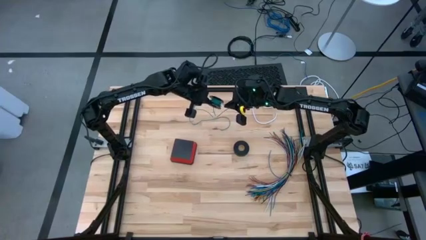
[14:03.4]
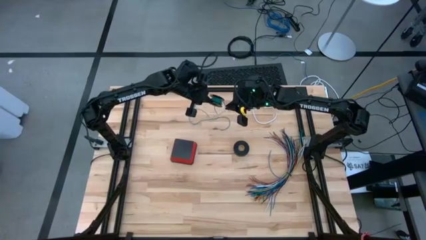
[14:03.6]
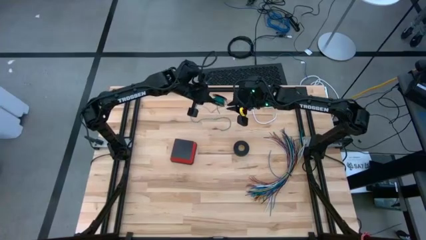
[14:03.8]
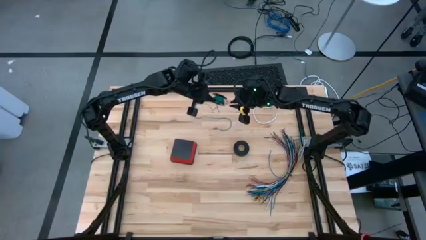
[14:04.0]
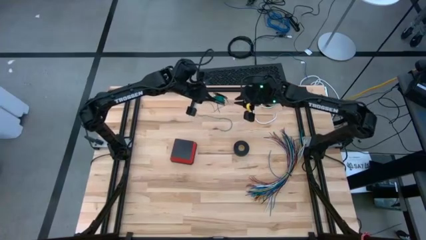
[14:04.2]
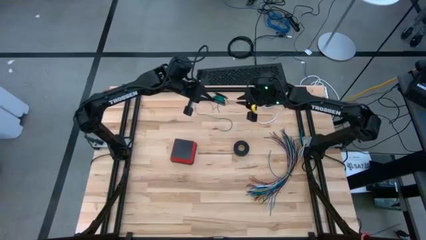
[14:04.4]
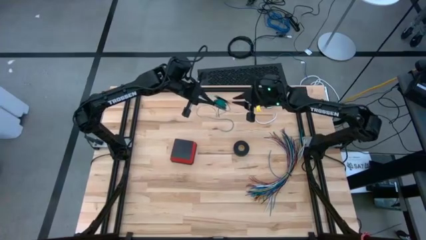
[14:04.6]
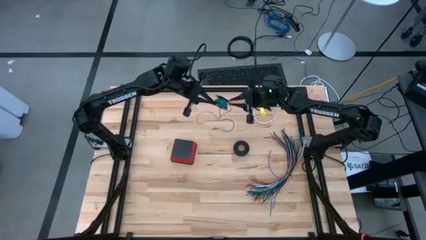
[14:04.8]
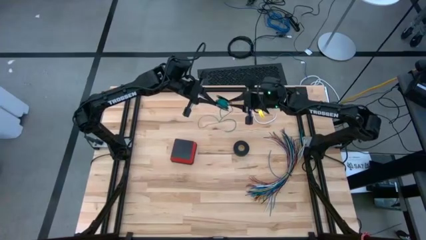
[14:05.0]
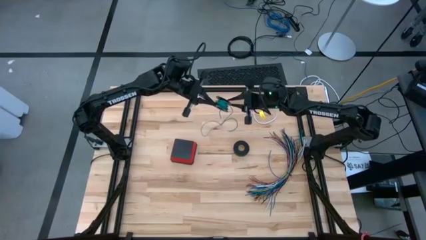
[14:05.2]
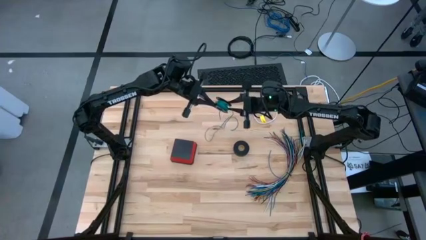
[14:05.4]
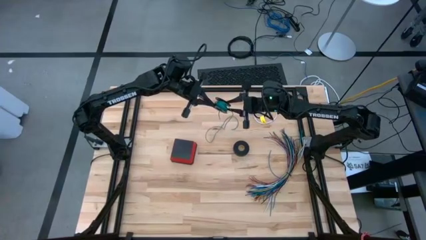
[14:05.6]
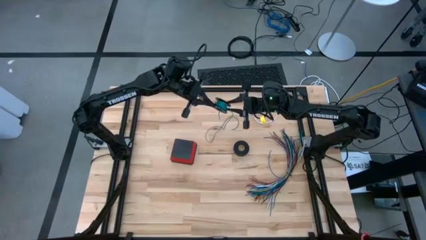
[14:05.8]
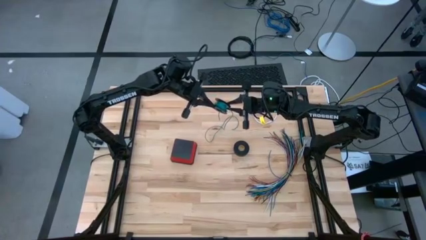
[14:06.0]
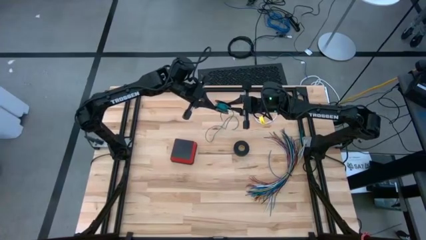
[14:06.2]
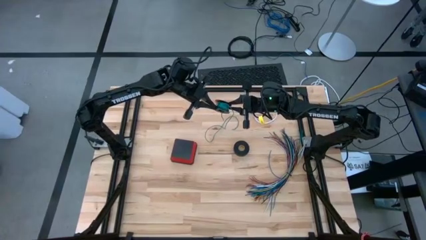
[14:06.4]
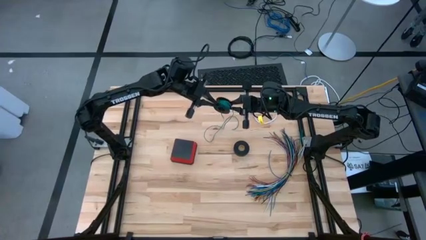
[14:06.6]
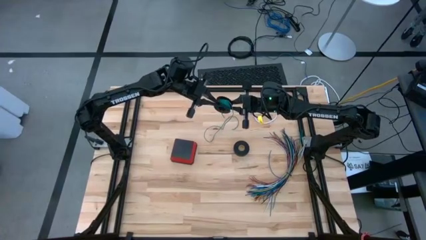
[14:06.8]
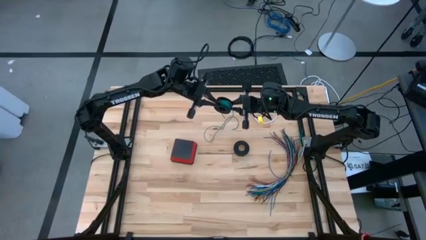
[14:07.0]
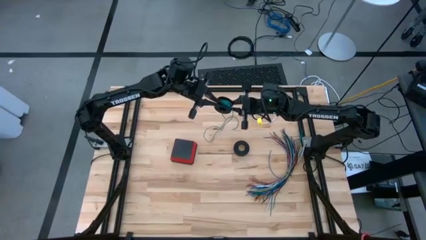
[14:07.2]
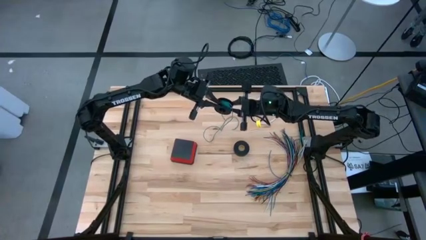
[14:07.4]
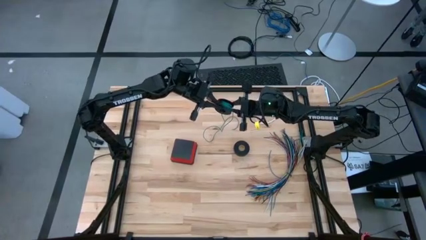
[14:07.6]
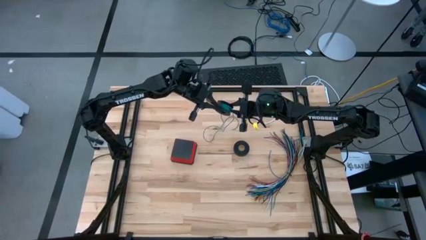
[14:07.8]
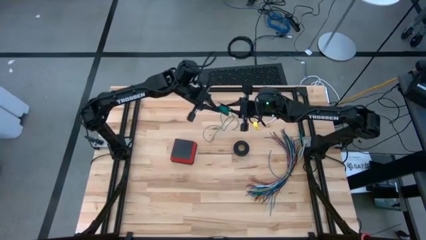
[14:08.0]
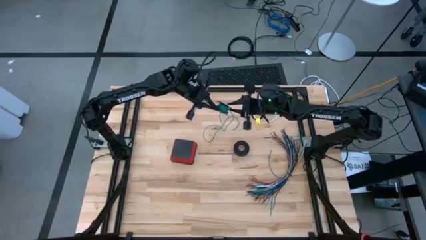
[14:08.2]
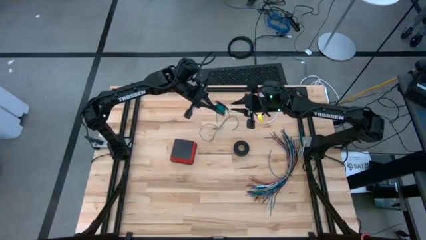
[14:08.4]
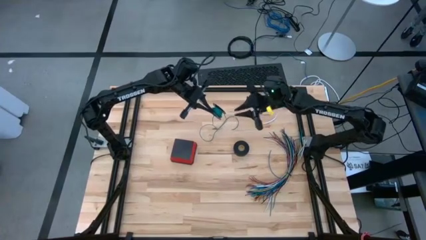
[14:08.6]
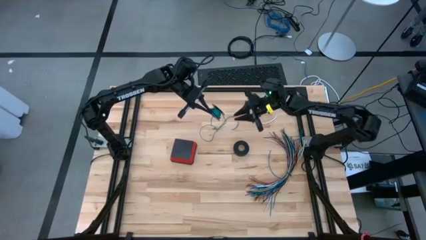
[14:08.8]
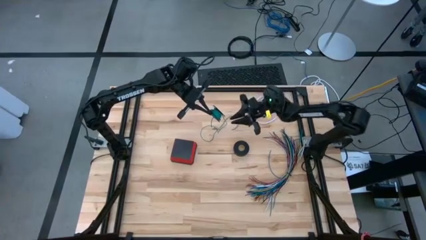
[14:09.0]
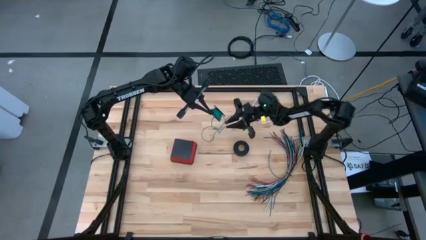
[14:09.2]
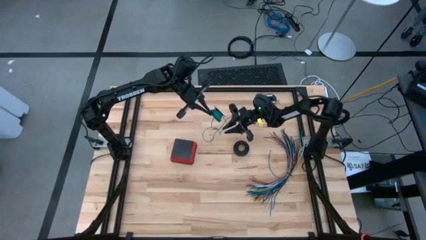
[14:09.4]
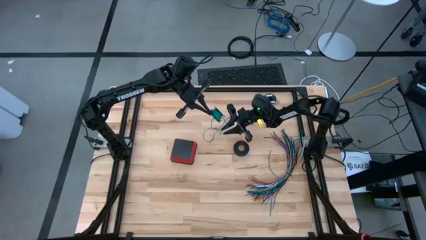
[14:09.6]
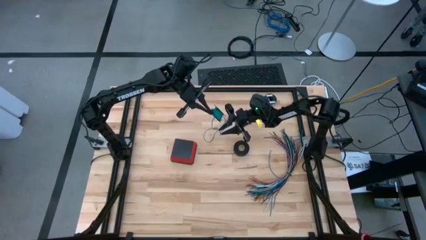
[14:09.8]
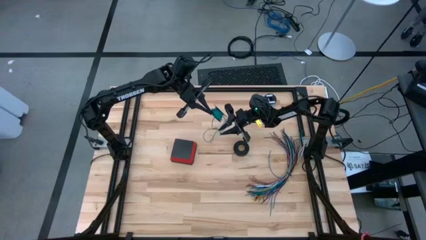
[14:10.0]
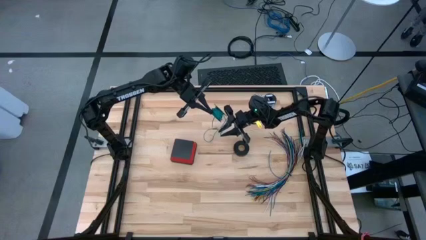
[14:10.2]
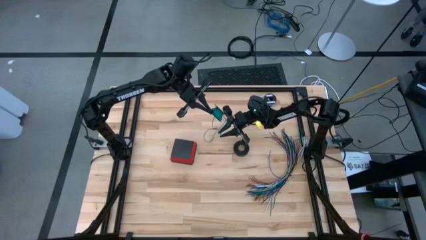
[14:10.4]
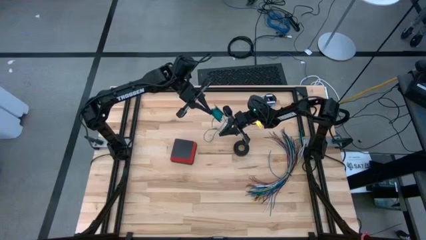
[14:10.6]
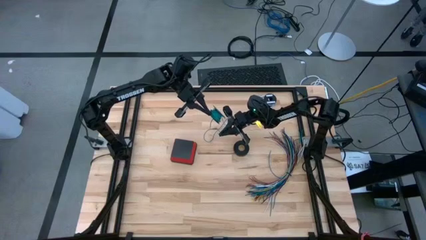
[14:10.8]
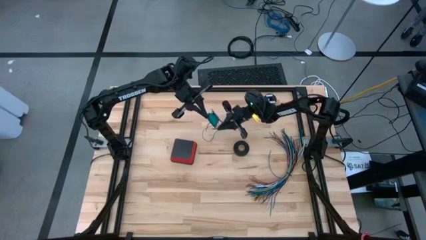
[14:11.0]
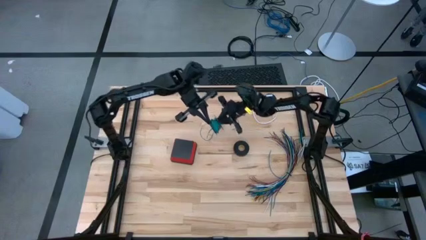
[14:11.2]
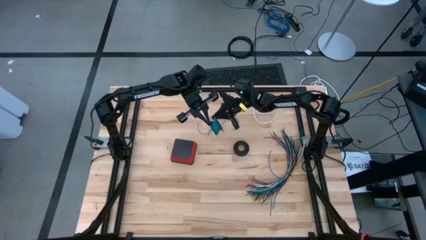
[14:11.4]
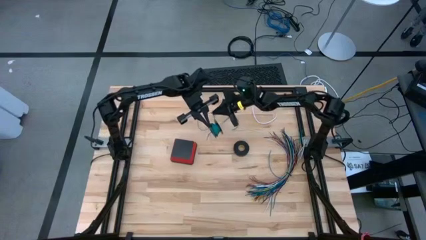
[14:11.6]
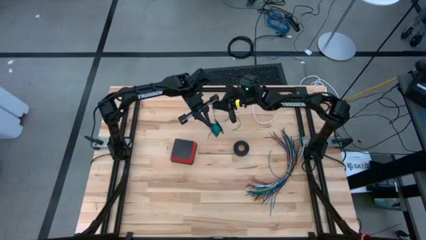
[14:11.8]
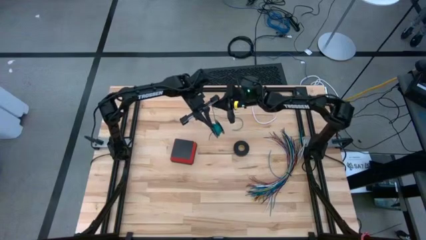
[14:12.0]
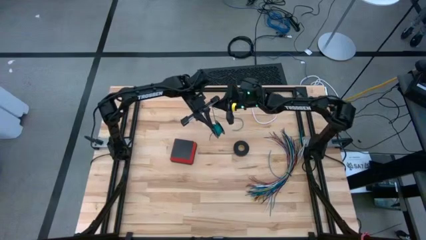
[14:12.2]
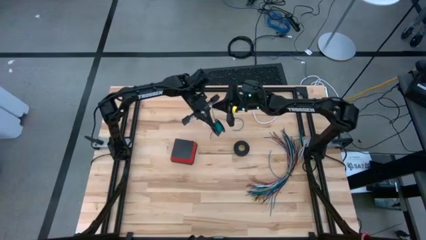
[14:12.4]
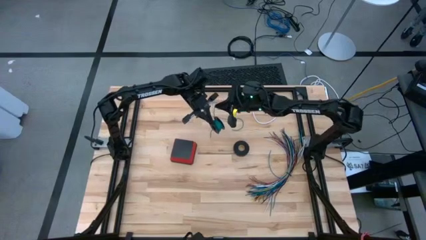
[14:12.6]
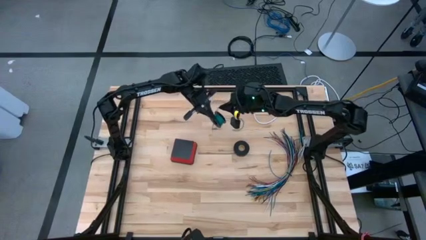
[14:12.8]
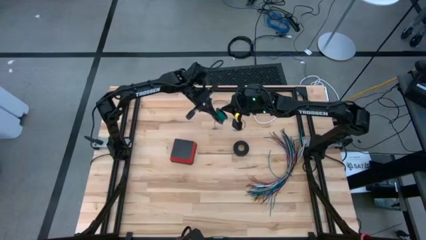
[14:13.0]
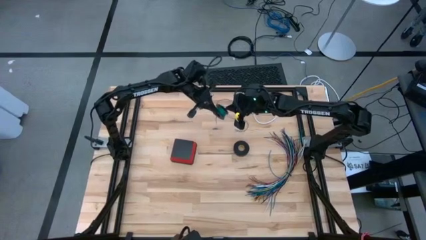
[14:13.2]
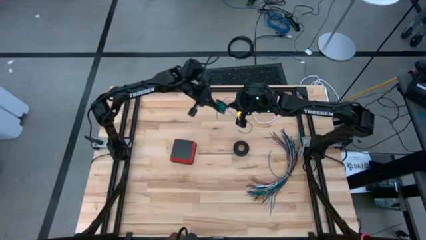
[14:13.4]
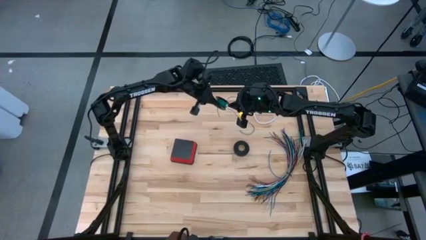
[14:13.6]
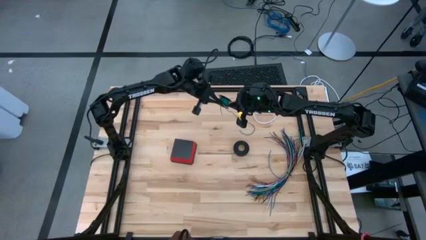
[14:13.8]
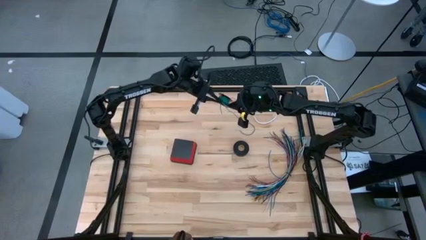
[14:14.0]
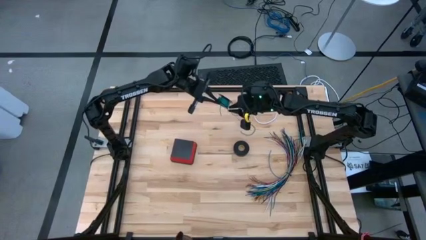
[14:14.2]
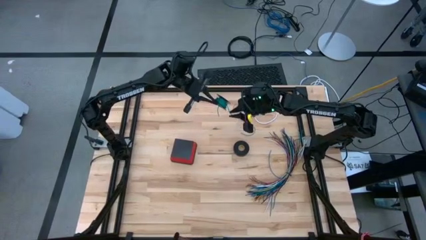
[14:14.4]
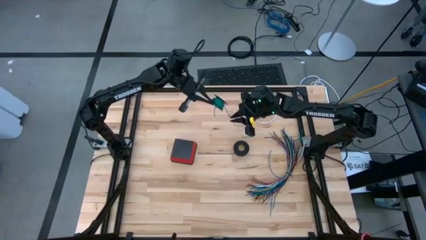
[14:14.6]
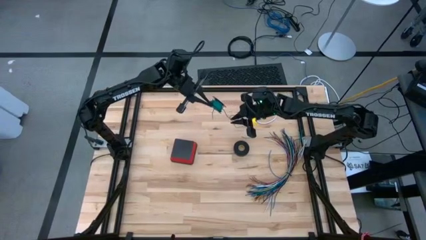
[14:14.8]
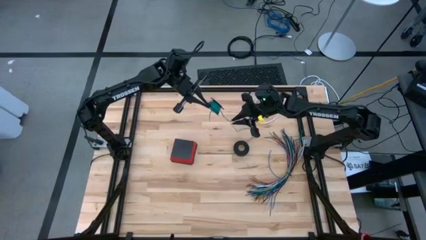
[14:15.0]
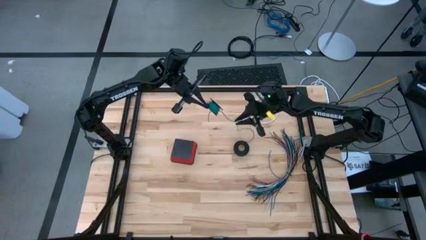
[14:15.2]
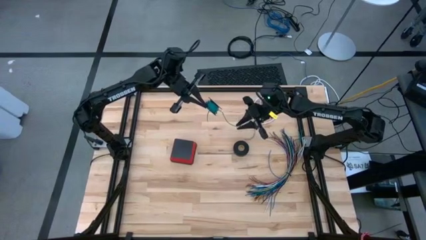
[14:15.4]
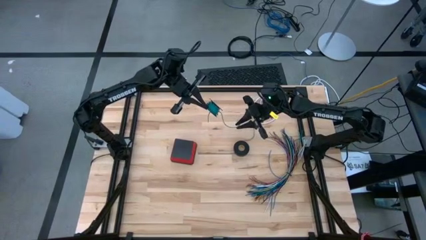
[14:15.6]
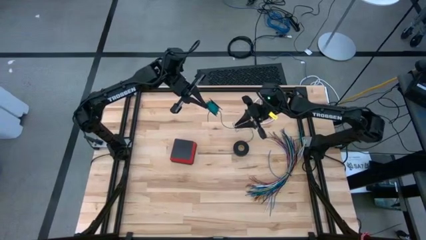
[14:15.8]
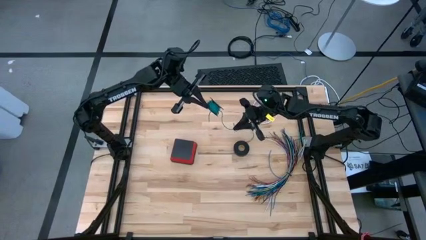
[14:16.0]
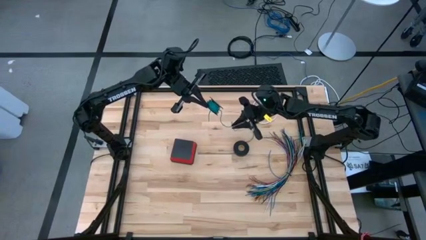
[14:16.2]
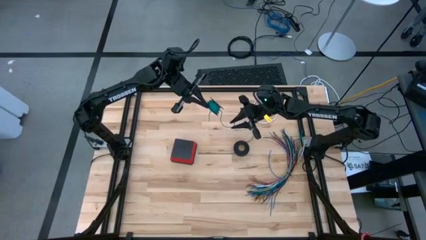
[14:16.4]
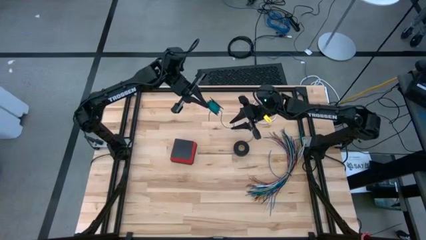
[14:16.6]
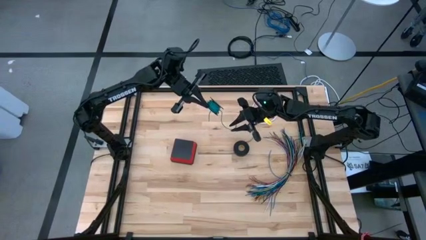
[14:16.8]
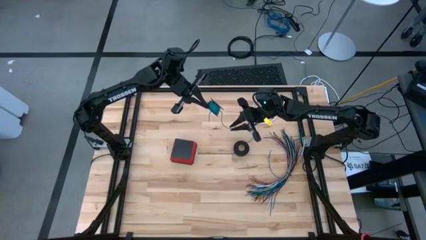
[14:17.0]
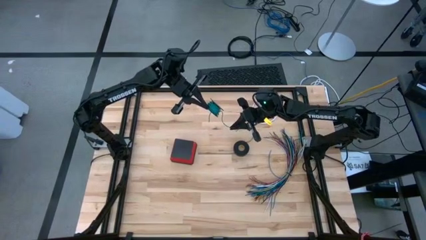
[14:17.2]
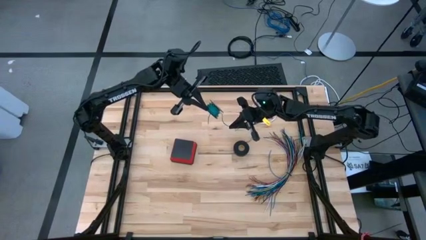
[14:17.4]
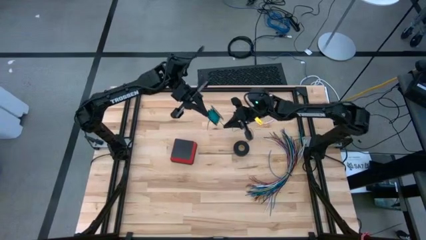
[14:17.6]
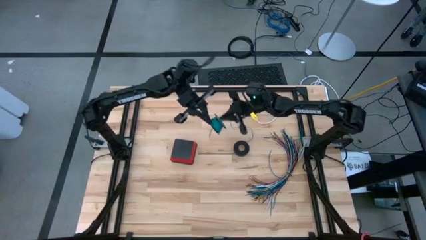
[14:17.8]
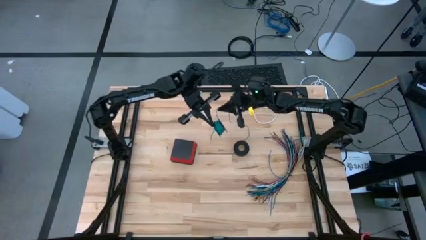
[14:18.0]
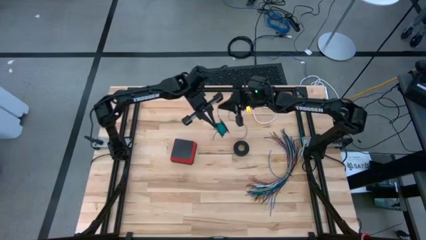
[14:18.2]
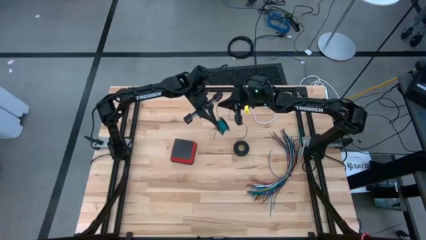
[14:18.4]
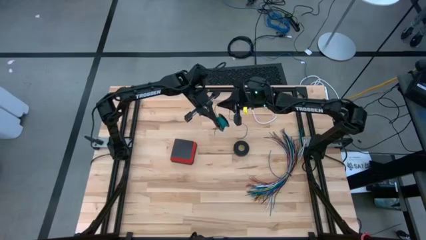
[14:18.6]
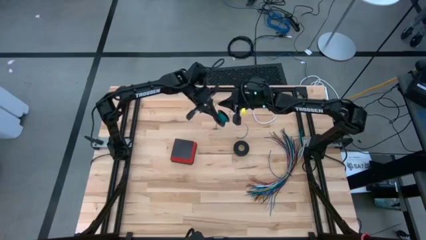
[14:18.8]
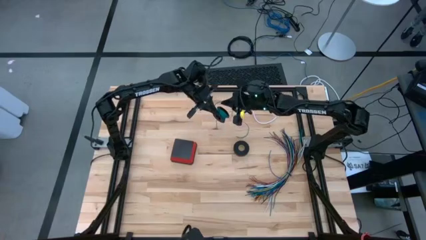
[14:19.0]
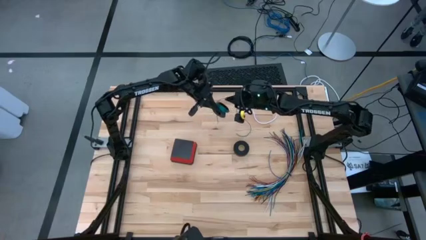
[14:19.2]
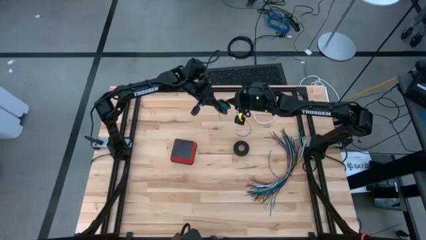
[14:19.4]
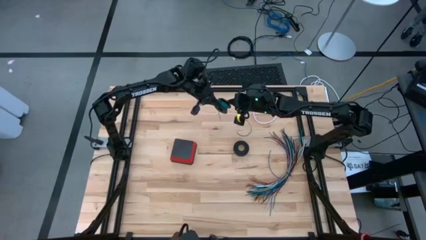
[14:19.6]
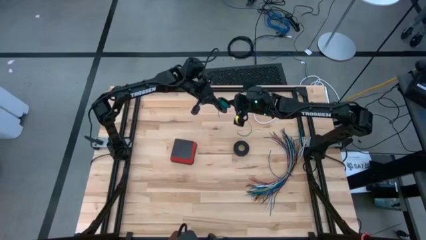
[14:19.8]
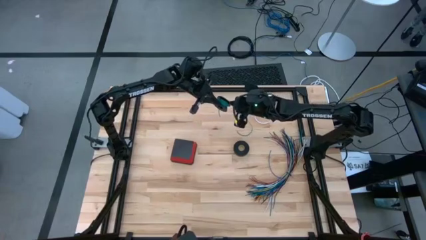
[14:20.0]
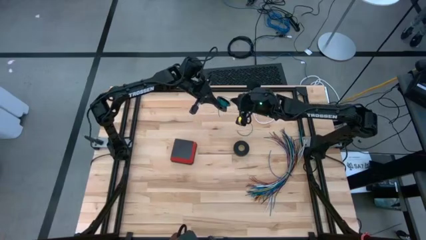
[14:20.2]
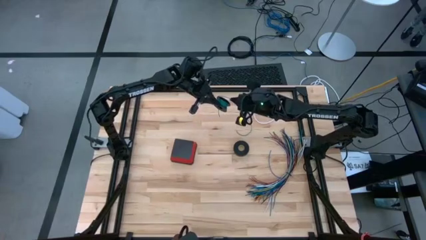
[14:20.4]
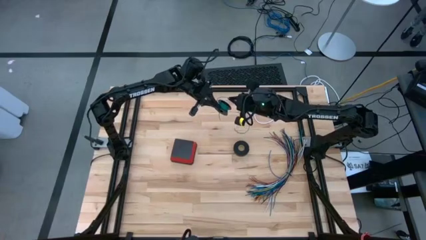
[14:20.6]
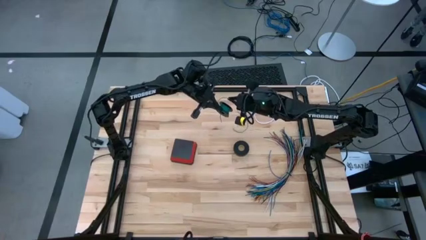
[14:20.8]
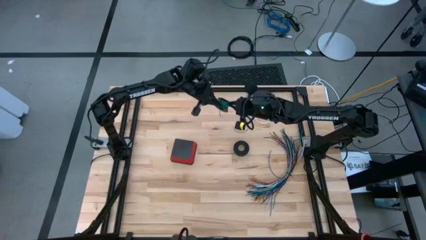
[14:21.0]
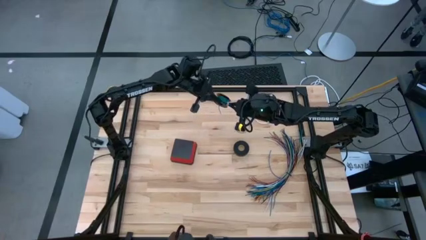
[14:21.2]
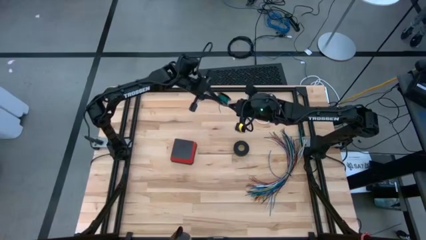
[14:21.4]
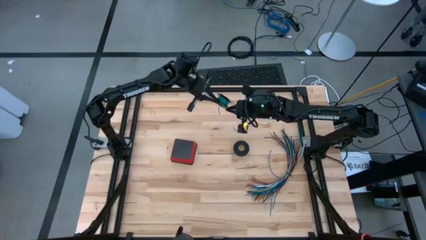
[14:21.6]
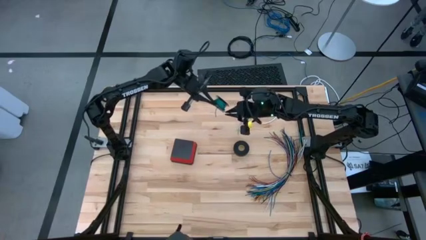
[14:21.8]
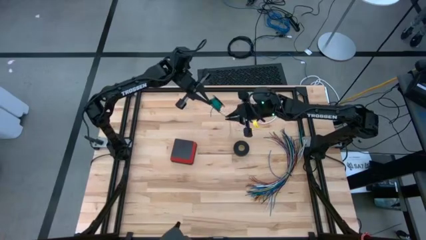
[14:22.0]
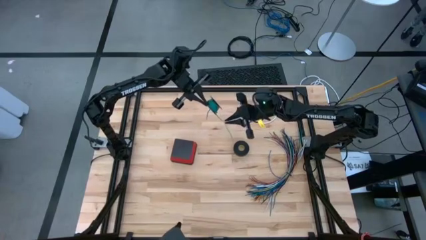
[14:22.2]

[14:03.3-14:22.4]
Task: Coiling cords
Coil the green wire cable on the spool
